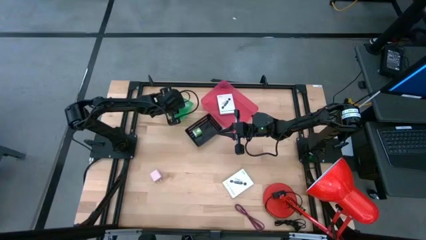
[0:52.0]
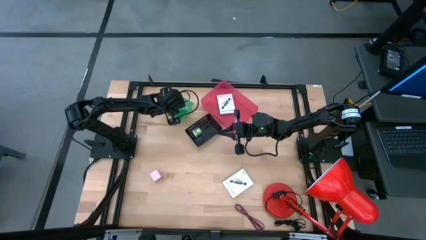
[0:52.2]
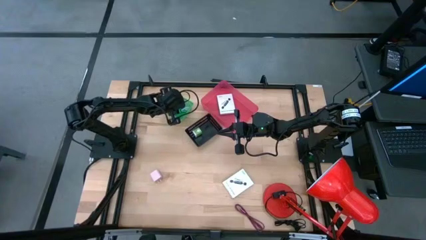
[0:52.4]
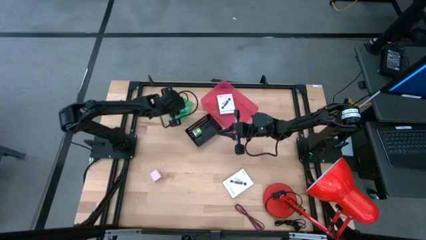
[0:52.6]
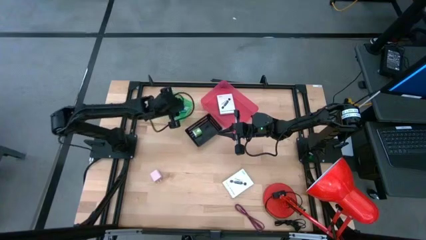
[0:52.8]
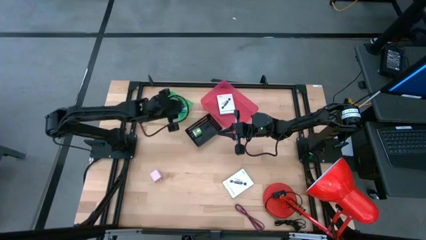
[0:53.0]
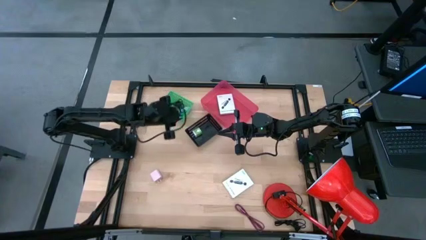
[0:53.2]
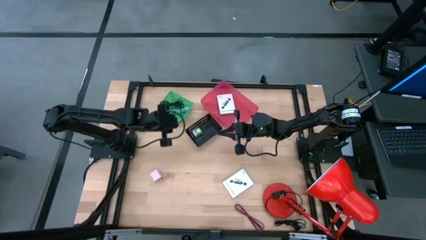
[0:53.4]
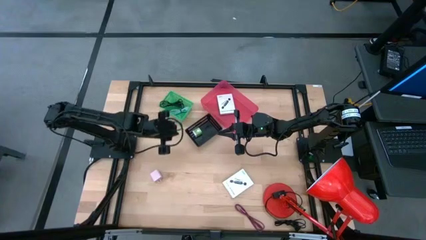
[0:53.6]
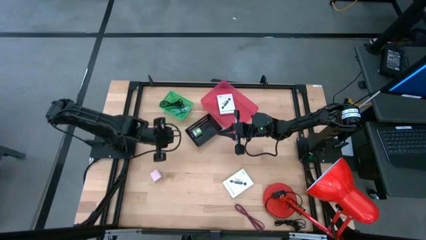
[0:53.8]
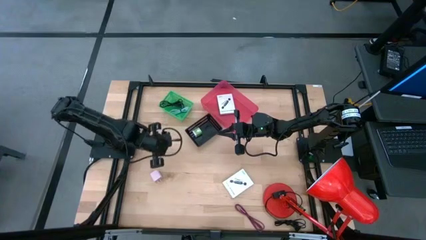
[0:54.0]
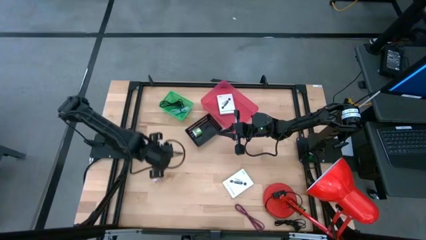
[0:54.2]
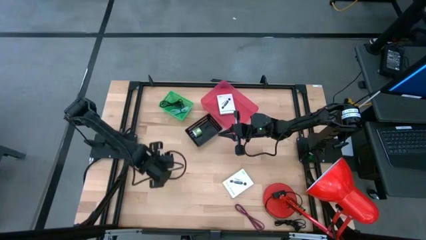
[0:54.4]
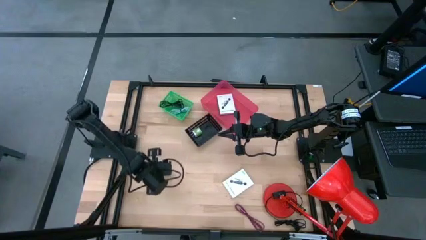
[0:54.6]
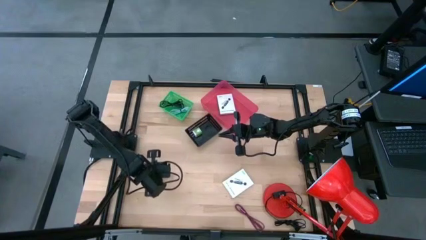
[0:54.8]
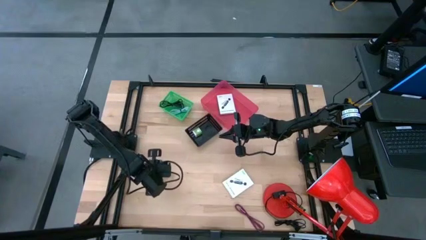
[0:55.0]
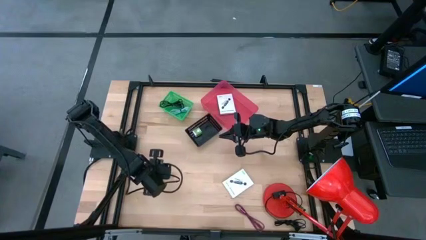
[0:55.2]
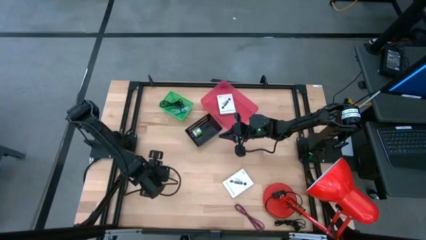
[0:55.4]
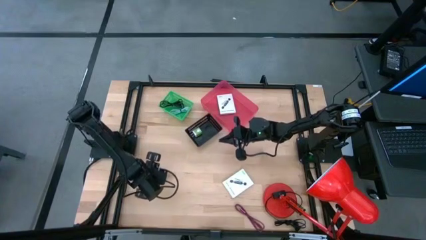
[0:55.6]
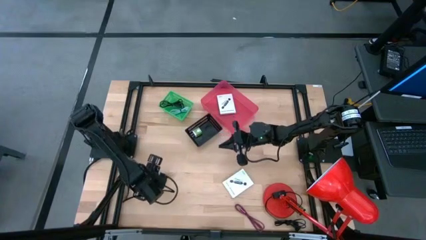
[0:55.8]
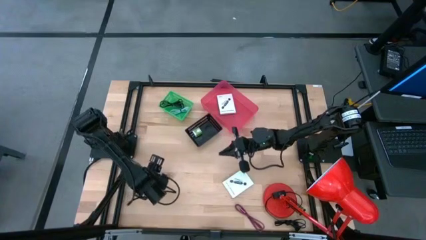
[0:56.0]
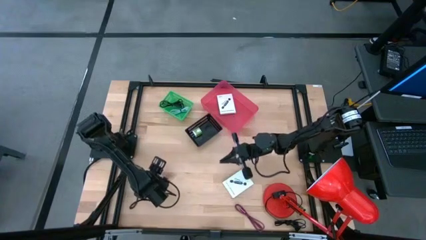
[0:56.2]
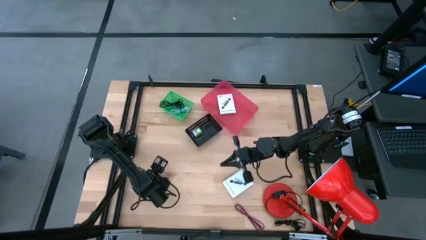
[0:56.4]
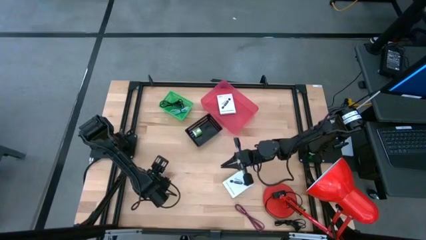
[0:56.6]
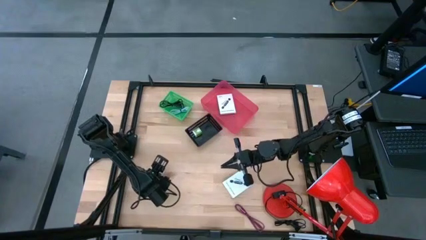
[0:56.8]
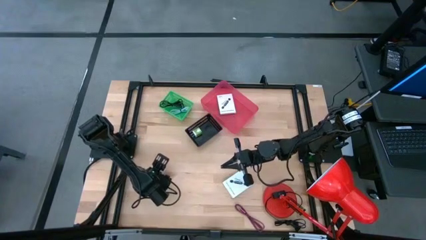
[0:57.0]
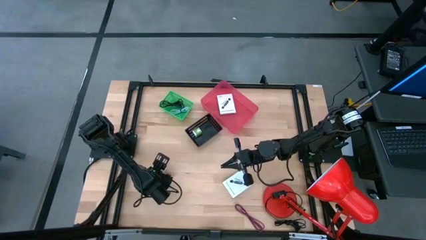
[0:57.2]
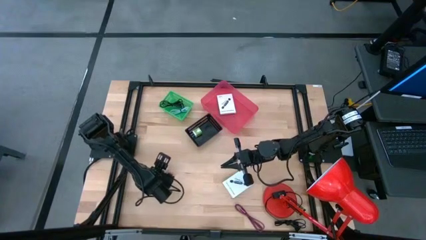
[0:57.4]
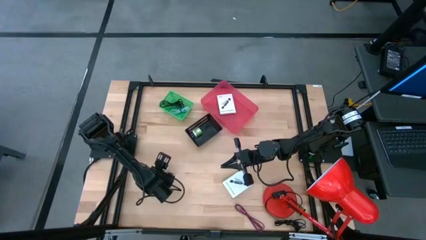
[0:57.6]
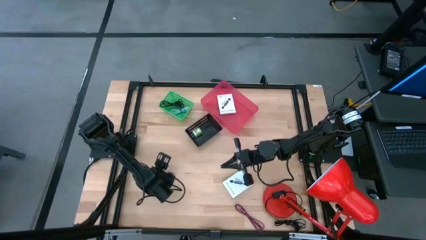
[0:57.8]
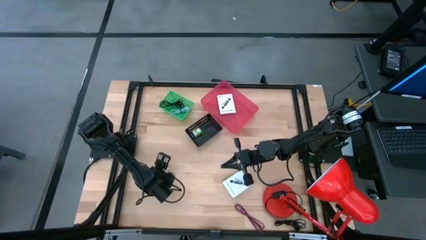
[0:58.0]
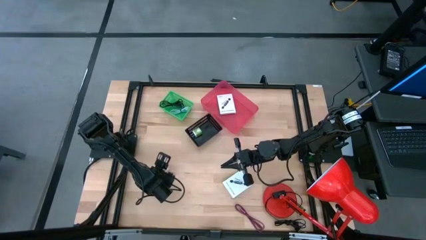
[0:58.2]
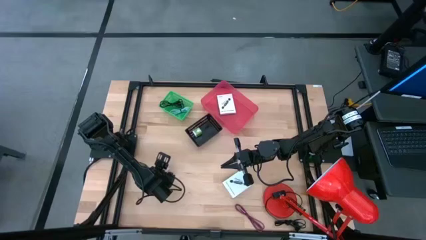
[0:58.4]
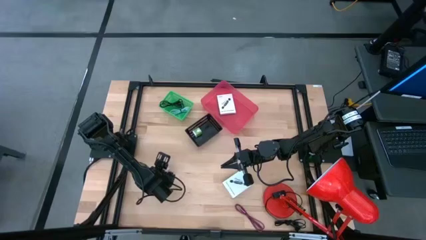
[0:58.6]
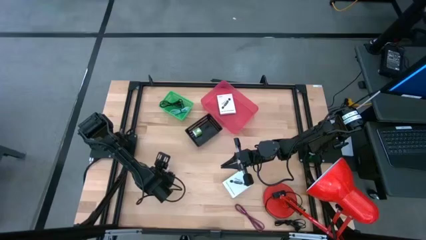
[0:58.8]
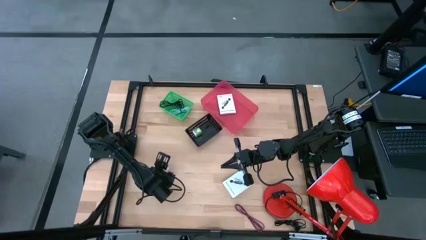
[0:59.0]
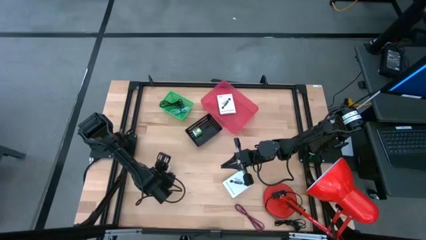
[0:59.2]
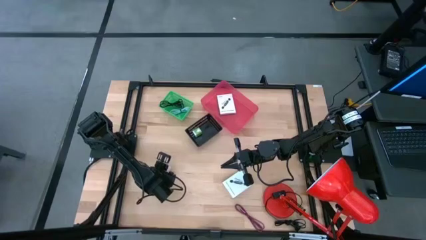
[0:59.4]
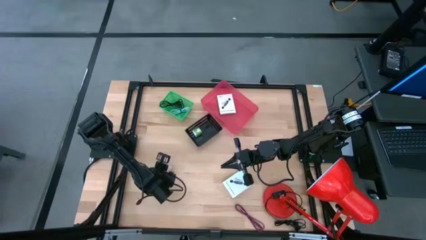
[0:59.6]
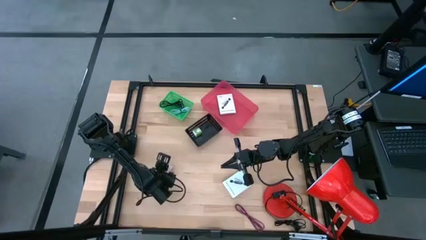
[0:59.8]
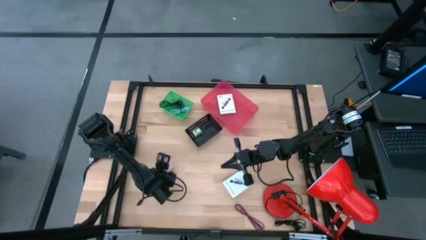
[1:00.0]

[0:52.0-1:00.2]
Task: Pick and place items into bin
Put the pink charger adapter into the black bin

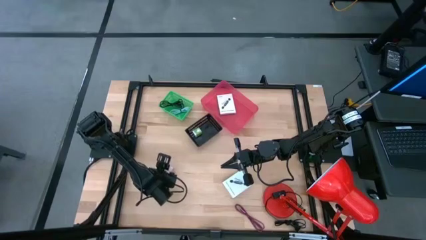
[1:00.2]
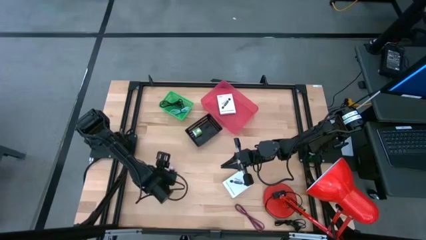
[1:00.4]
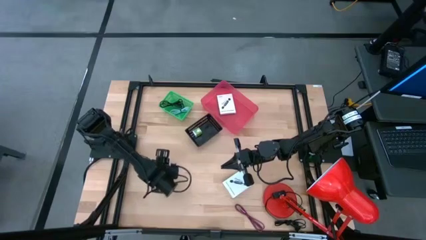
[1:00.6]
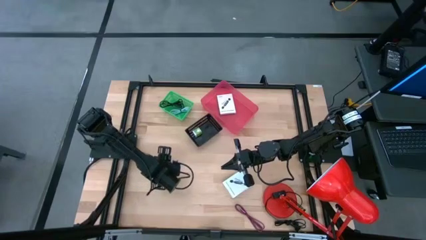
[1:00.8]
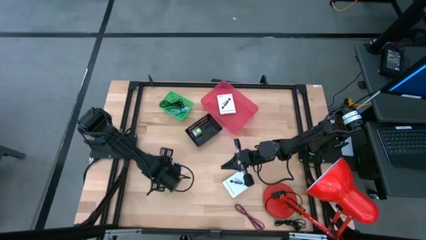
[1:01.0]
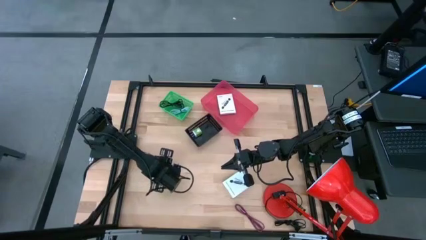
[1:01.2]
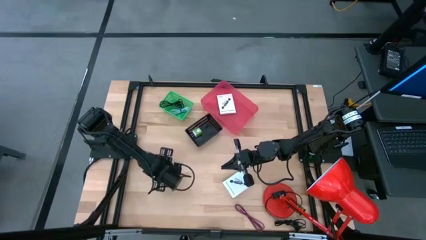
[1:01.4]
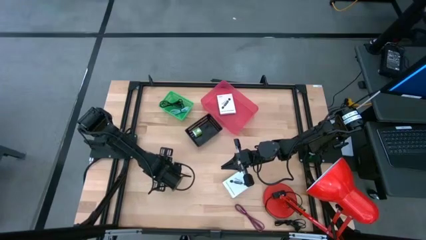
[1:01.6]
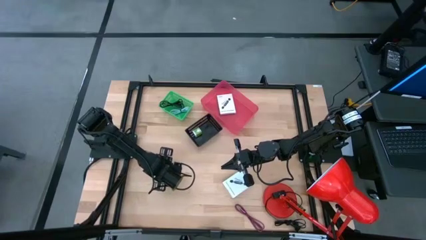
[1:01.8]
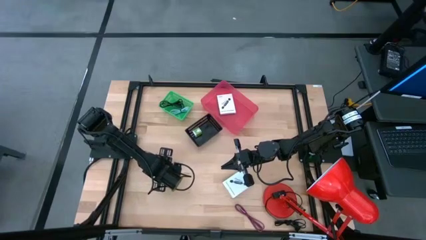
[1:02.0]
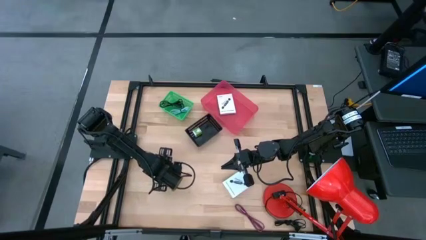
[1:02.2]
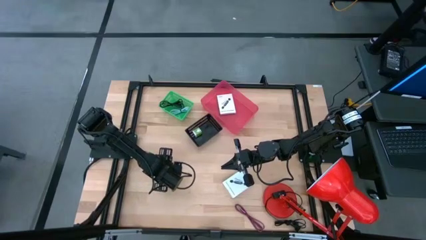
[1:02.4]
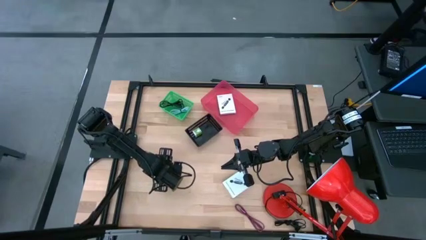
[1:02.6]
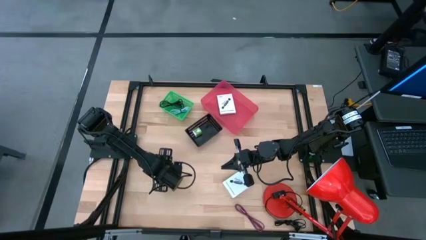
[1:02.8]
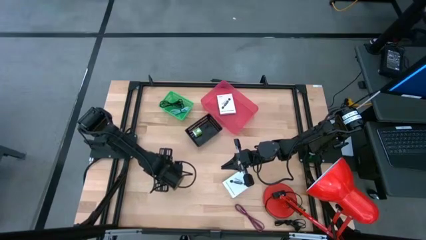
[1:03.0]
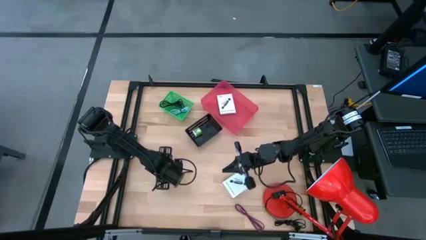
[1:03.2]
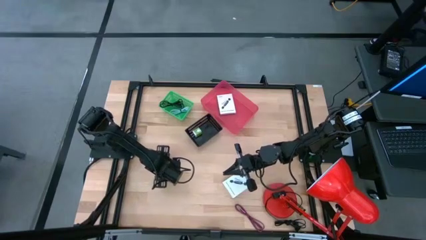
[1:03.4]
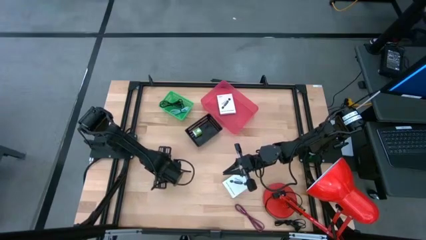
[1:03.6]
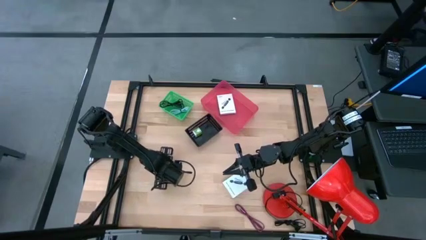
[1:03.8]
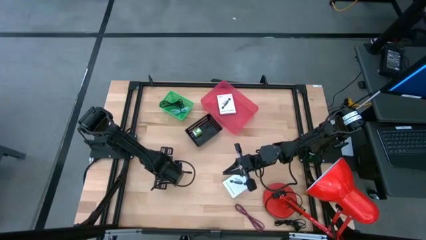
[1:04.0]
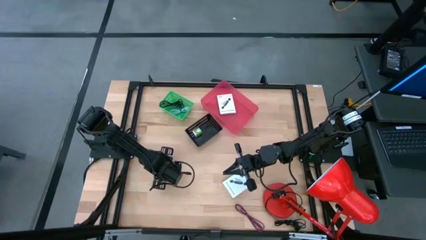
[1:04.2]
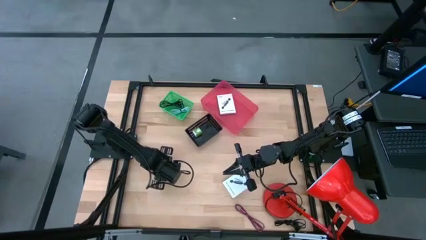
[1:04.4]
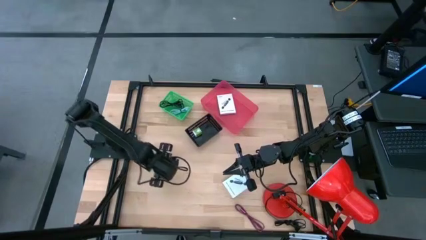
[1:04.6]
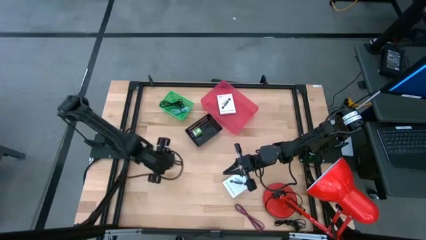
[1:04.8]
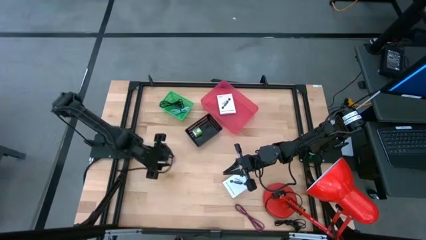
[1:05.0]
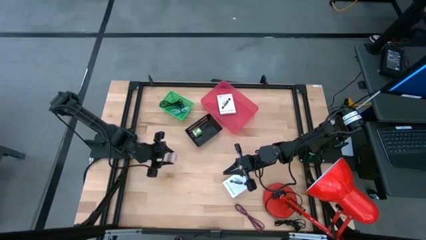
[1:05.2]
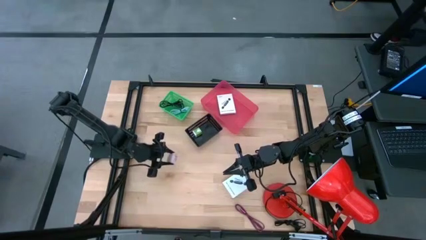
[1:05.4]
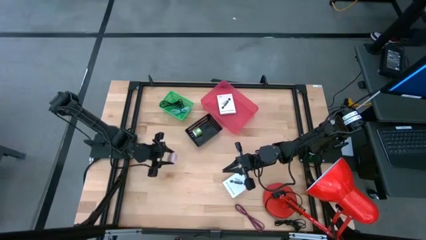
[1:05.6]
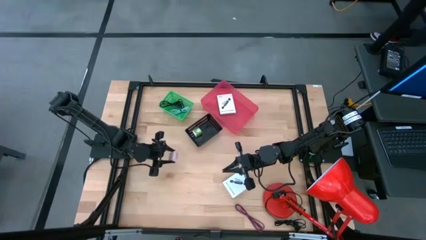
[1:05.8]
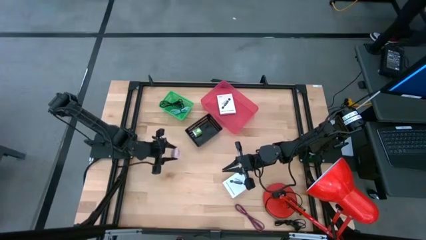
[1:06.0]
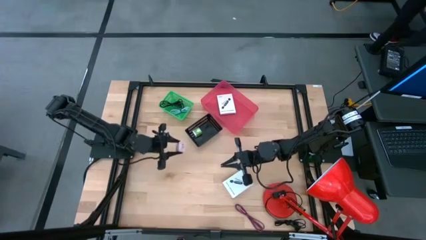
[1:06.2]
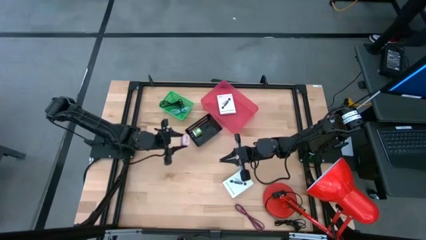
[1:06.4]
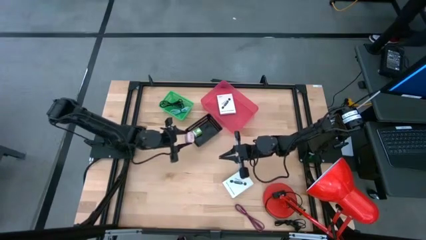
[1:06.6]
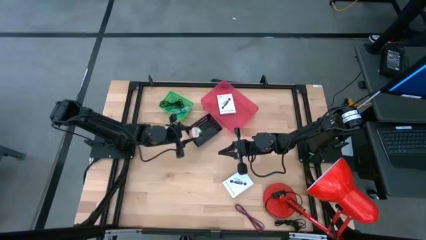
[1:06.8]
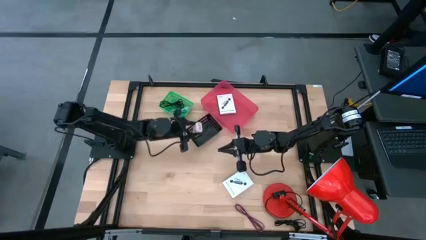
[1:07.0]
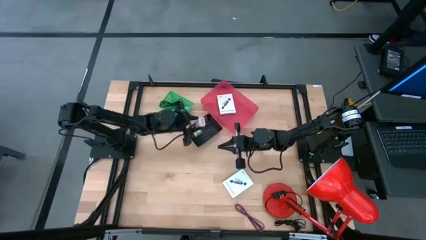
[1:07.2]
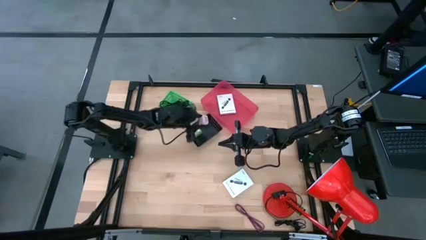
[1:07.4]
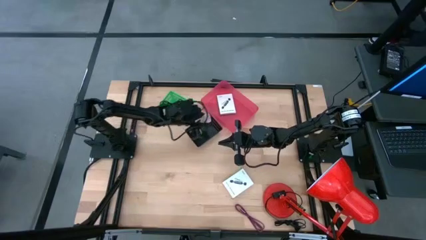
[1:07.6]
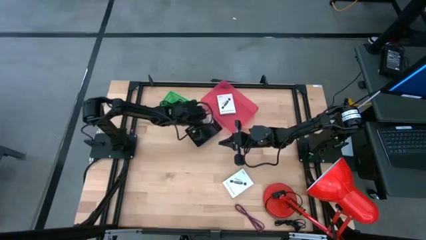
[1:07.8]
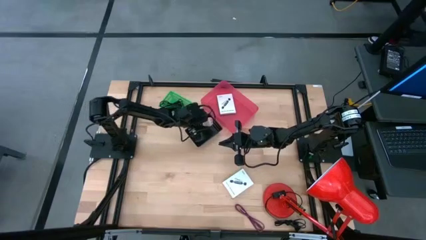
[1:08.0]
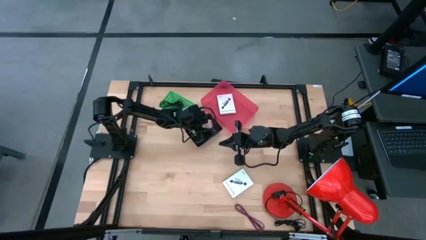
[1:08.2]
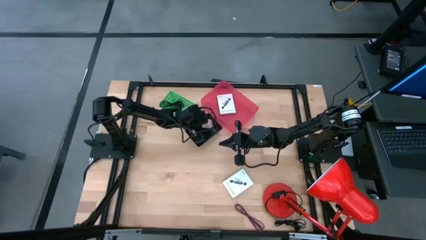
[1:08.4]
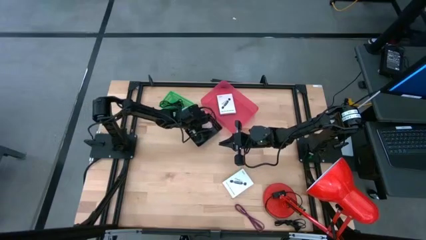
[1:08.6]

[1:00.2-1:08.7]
Put the pink charger adapter into the black bin
